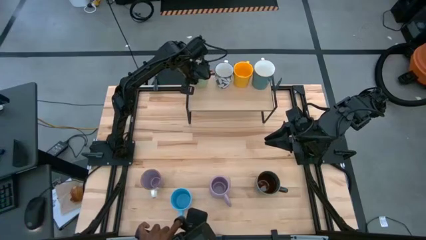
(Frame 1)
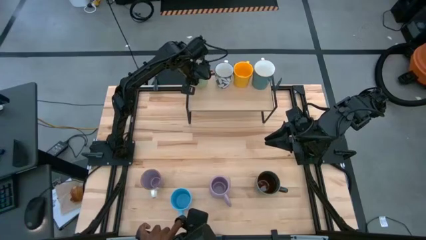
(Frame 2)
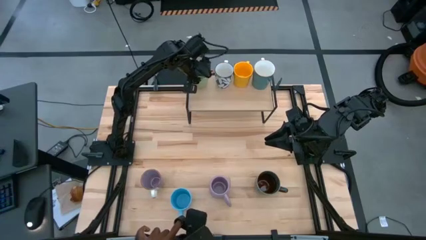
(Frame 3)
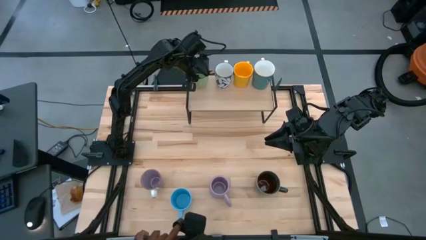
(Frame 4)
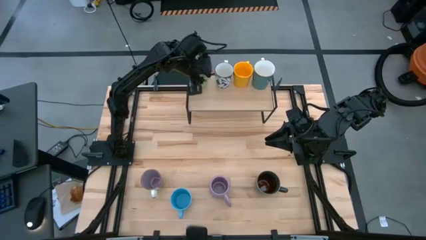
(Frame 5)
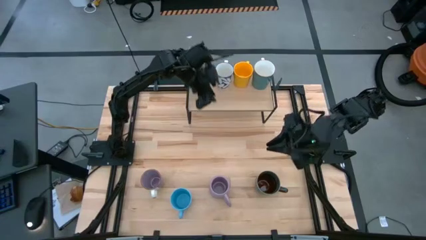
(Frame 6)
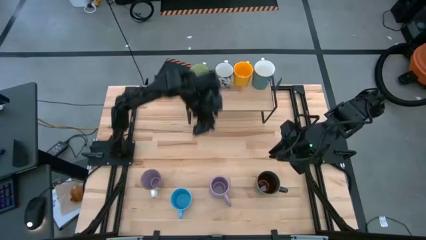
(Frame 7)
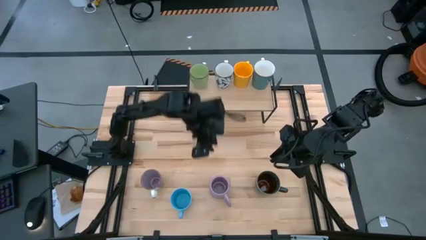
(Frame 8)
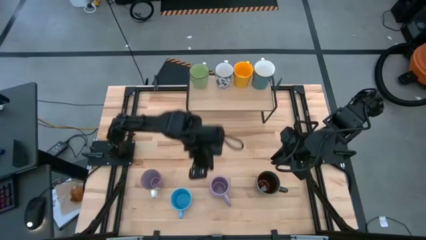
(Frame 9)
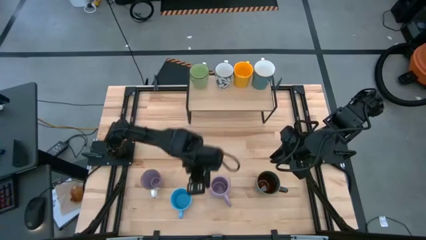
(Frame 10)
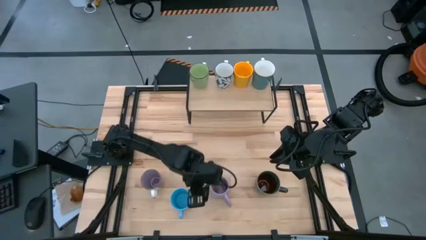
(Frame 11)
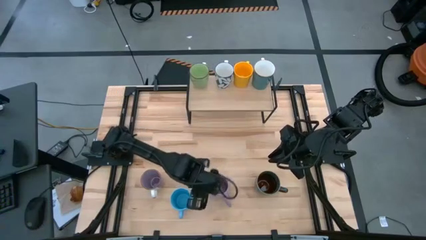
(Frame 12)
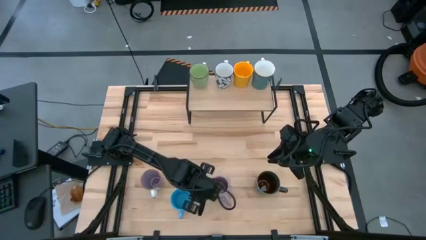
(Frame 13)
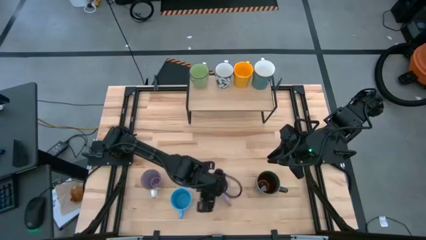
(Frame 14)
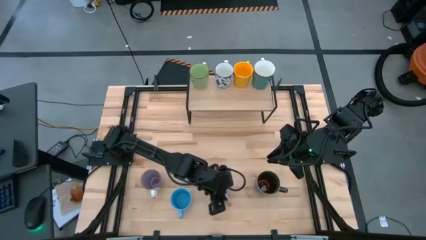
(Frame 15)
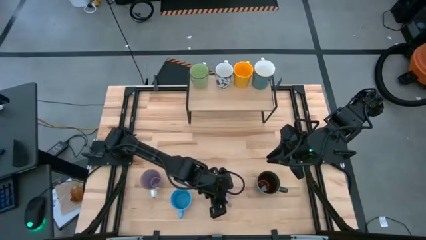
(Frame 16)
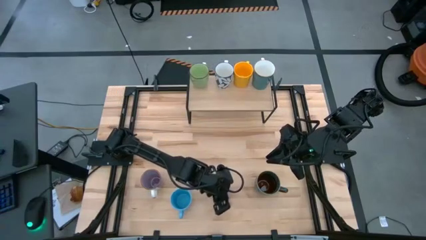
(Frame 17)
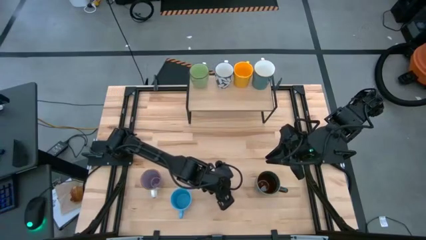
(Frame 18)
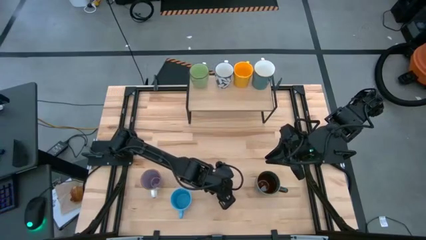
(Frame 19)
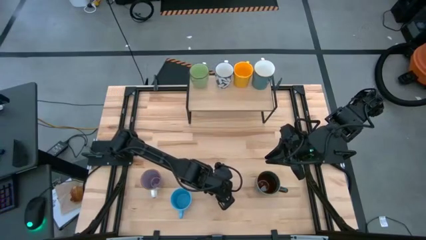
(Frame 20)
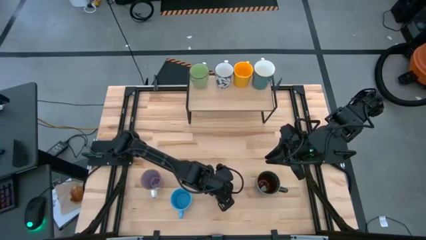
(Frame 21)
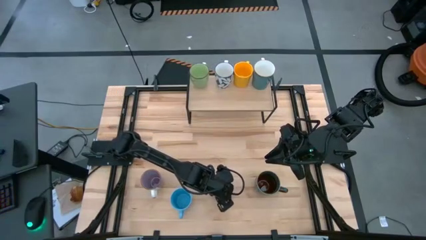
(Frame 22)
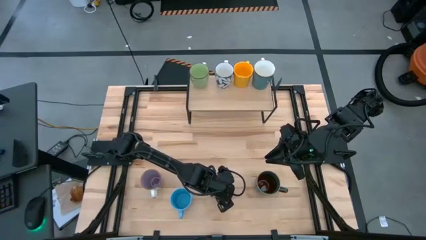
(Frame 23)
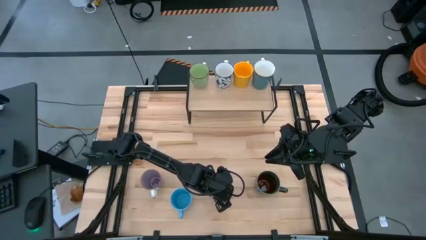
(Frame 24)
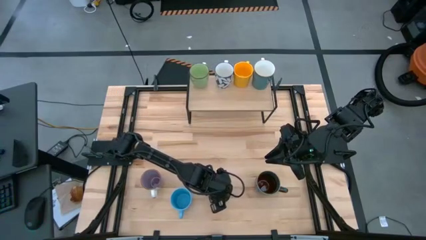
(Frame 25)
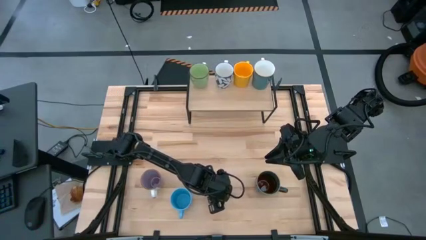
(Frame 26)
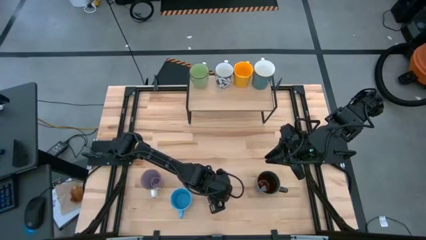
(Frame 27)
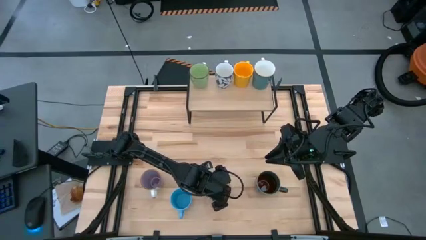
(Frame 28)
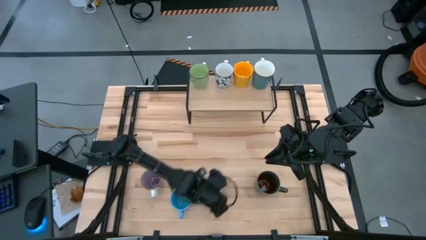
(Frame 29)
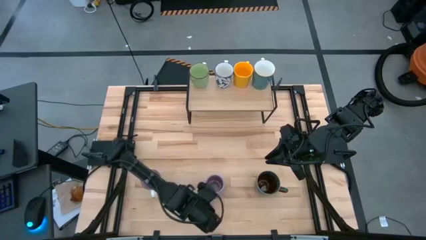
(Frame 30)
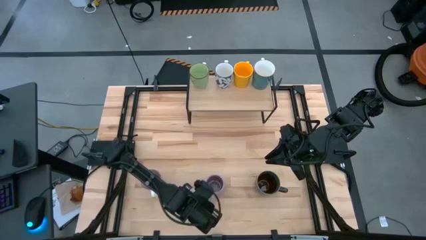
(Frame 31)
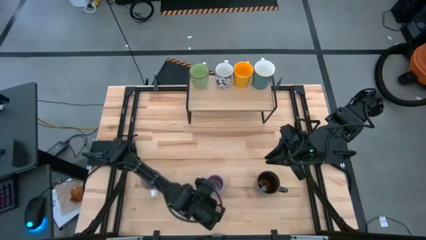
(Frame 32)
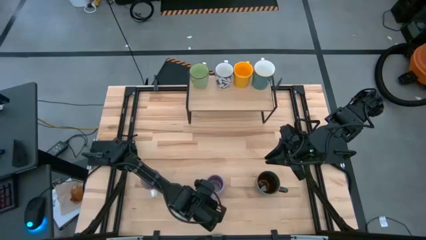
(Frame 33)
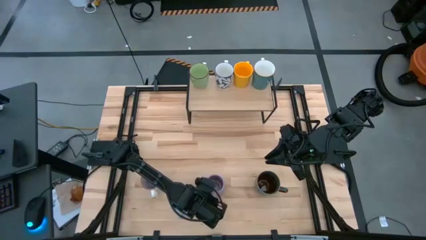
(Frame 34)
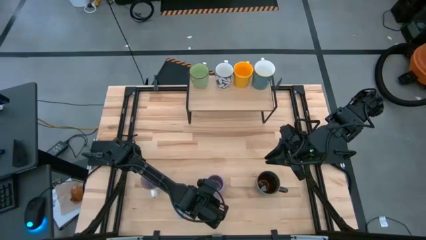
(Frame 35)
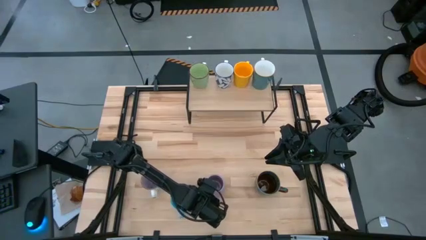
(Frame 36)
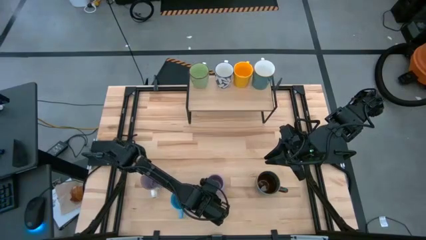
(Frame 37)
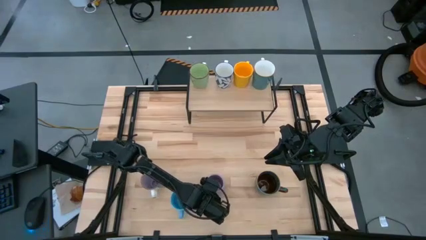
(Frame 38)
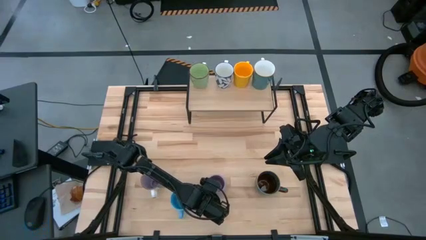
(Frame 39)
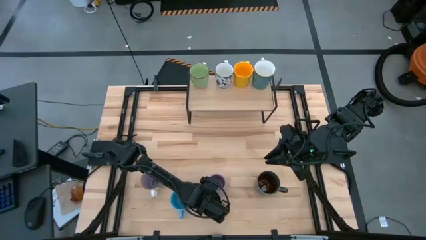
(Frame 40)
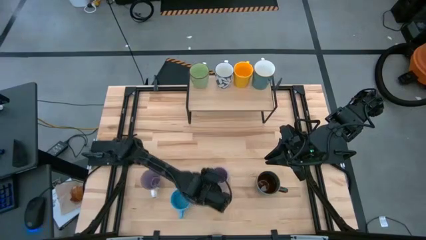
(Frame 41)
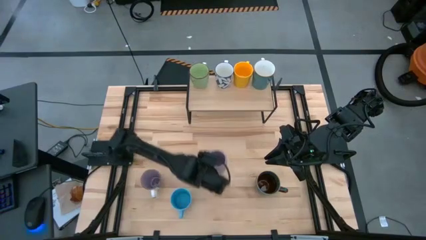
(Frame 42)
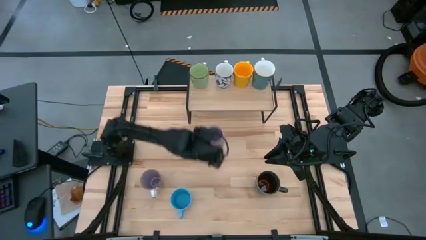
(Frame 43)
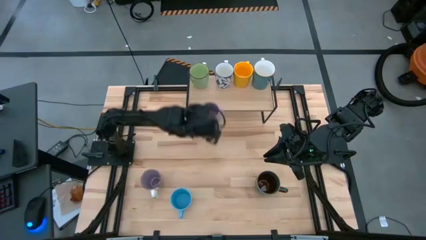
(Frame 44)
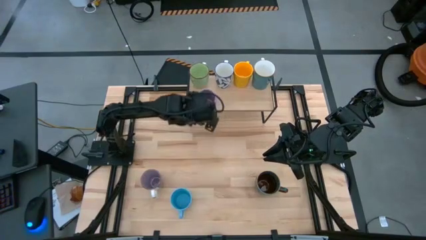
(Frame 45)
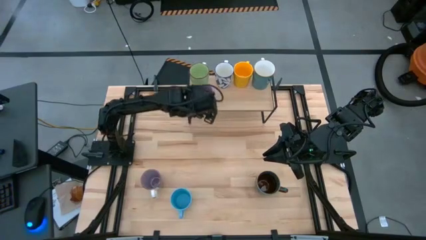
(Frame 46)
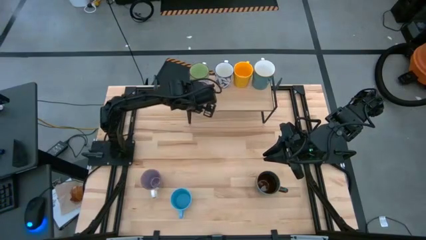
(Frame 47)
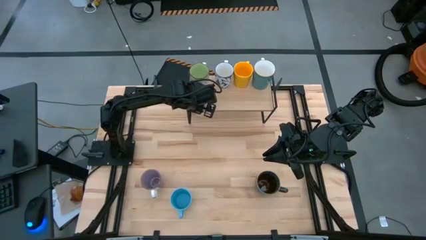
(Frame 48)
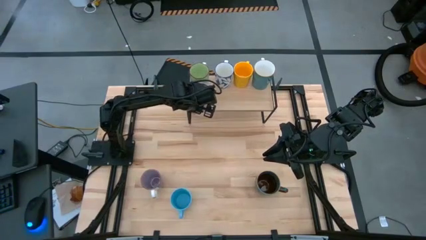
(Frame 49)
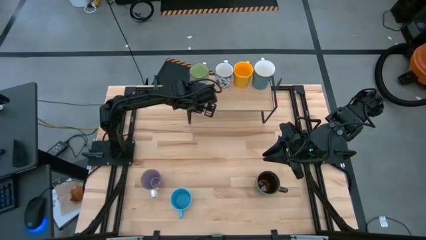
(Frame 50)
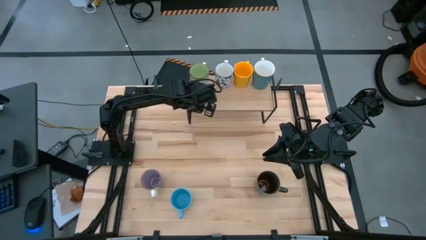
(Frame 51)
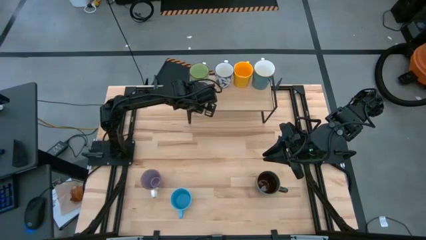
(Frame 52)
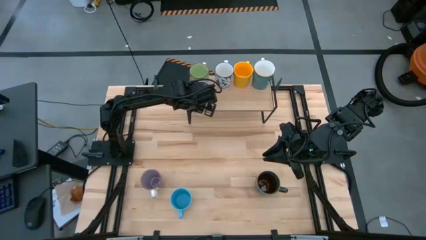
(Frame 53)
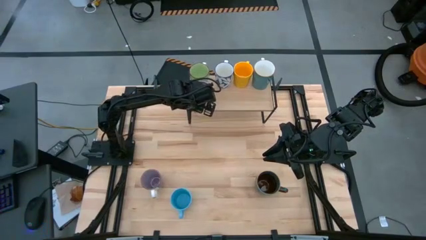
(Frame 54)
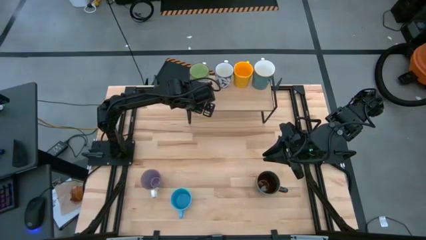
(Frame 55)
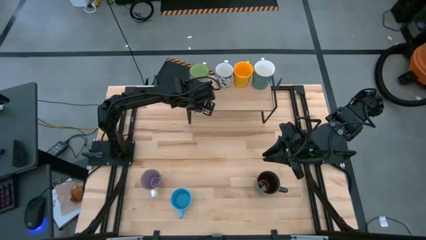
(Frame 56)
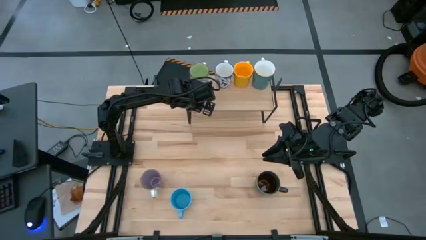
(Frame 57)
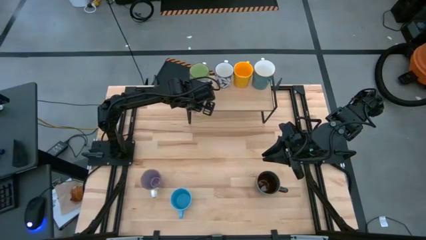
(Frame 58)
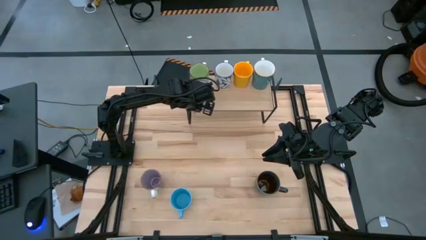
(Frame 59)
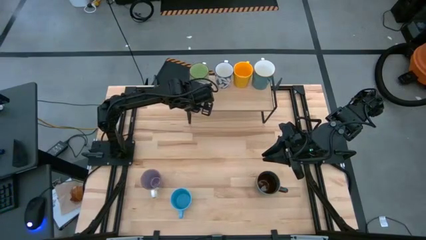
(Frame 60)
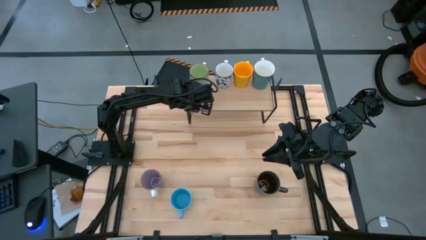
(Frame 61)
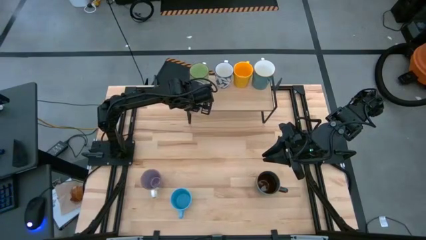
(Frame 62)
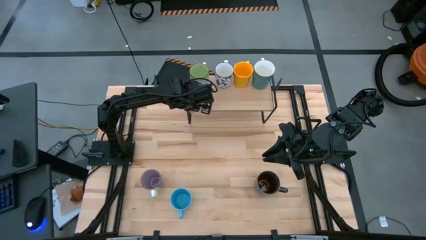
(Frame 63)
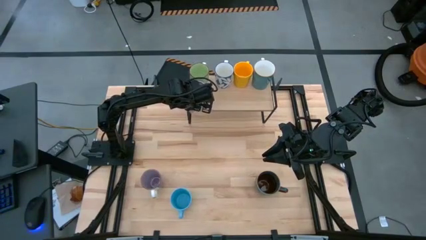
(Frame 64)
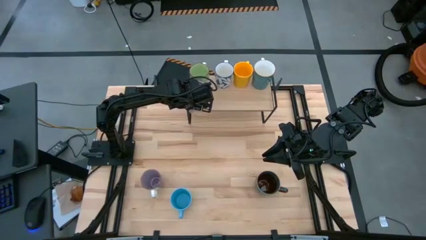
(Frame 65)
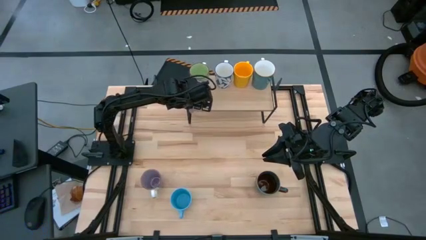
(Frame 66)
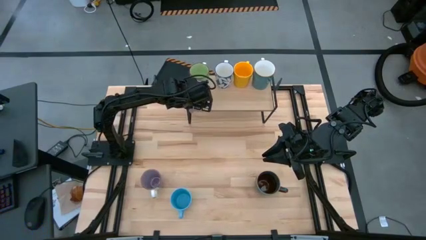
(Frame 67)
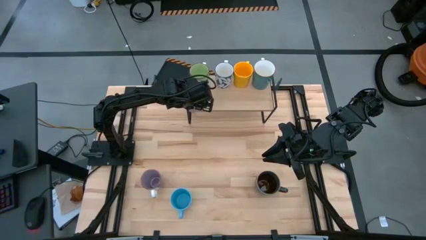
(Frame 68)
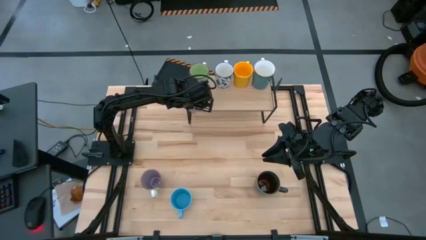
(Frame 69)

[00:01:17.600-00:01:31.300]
Task: Place coffee mugs
Put the right violet mug on the shelf

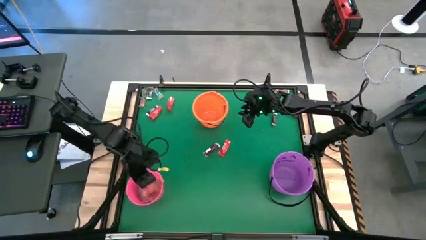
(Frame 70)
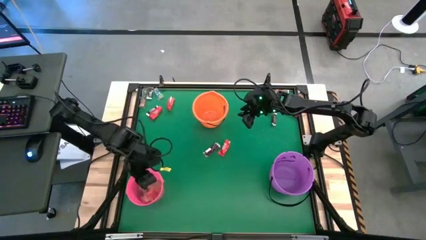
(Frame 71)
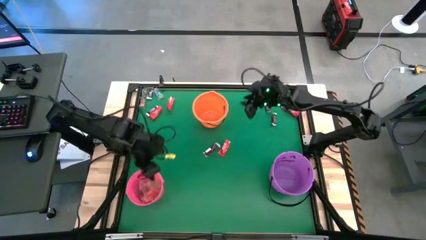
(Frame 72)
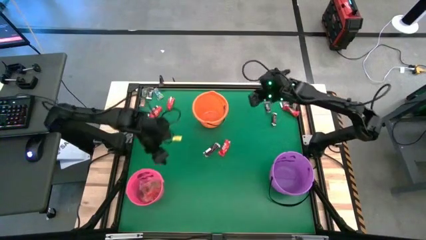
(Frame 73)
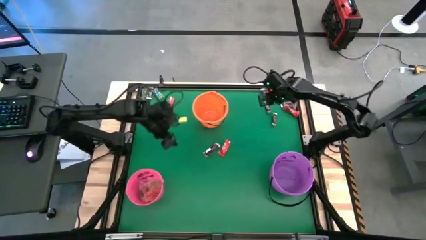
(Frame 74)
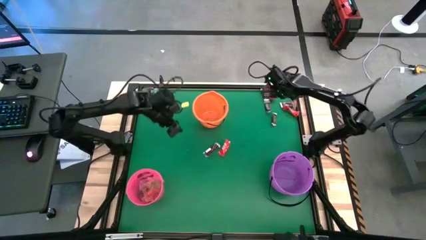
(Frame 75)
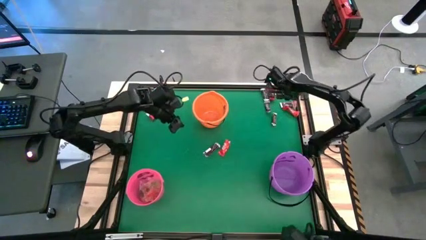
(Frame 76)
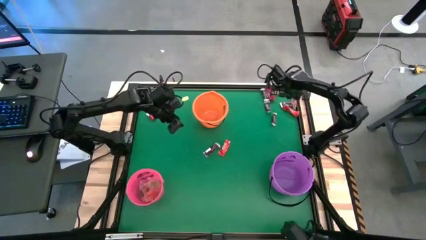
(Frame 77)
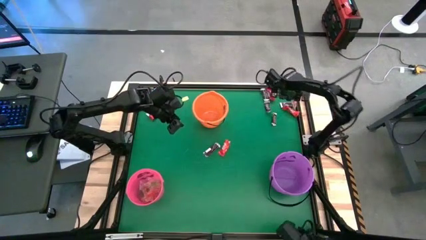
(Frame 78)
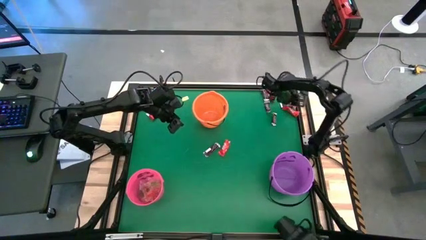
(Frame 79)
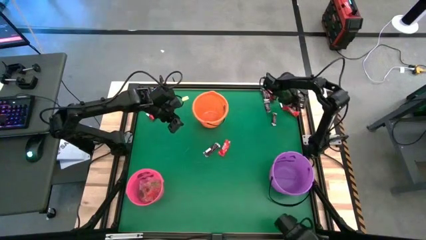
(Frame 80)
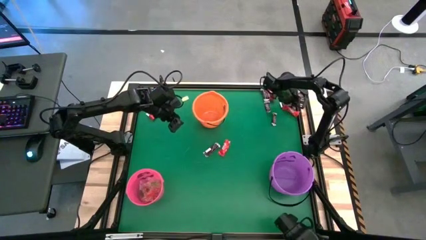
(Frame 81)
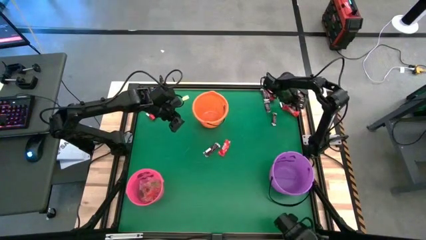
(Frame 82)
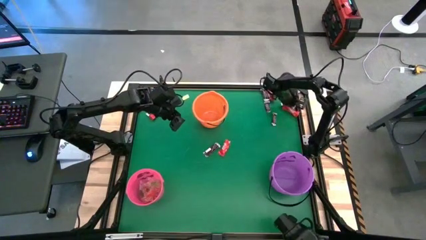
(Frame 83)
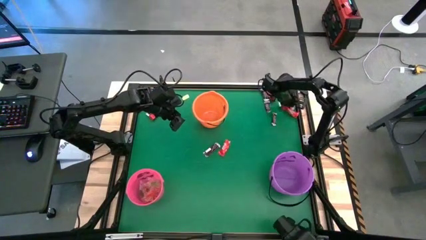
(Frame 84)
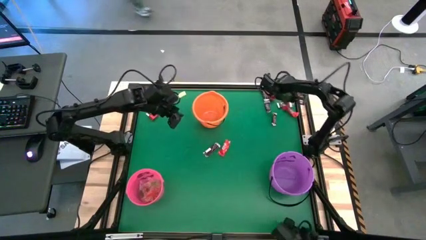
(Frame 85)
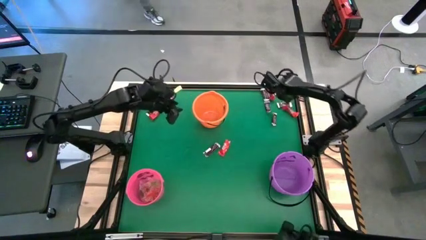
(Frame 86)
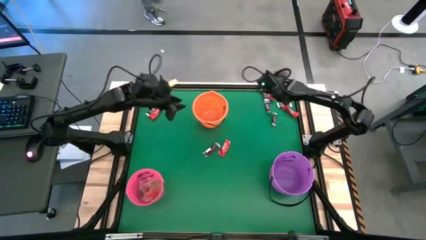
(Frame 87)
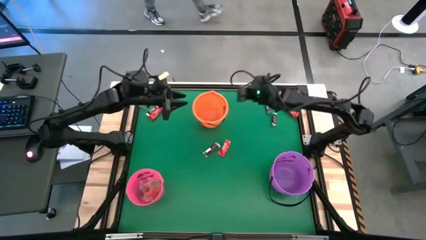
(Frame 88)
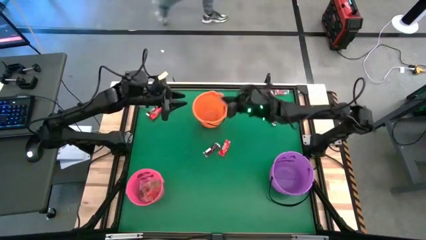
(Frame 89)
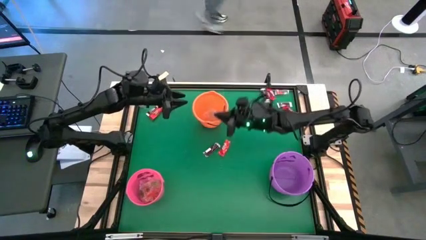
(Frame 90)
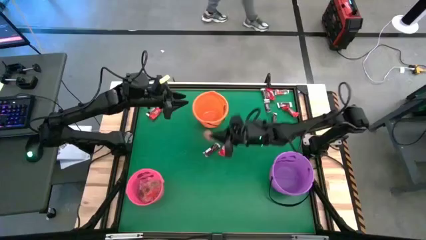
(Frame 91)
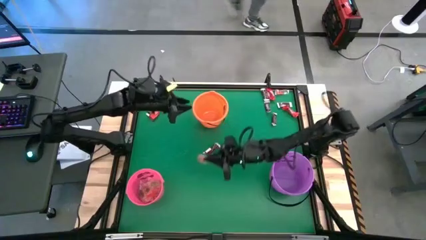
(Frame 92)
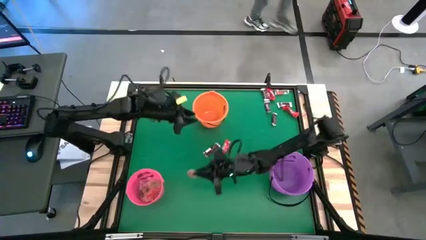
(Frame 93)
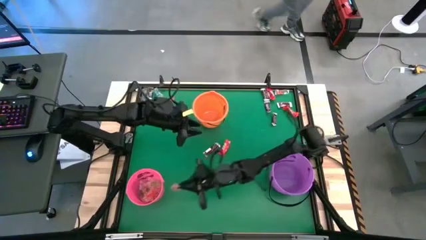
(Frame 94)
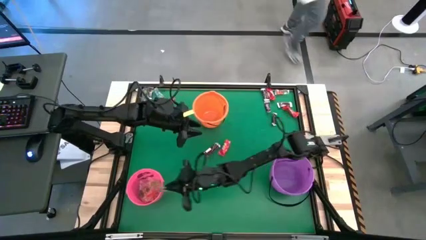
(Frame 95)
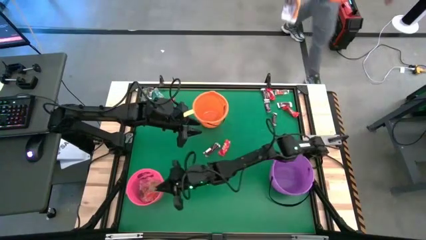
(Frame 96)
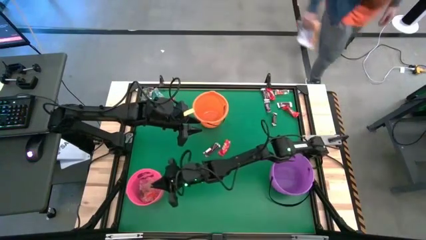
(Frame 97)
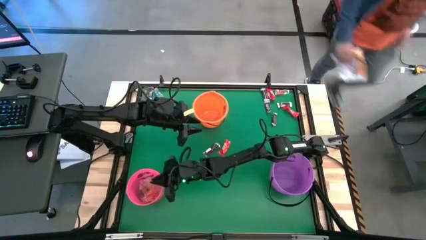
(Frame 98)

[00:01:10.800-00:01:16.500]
Task: Sort candy by brand, put in halloween buckets
Put the orange gummy into the pink bucket
